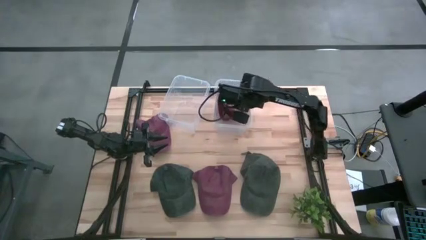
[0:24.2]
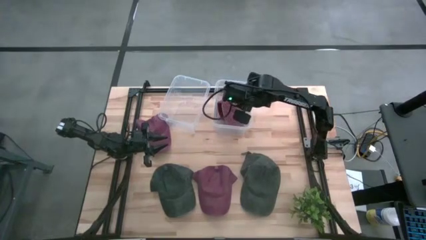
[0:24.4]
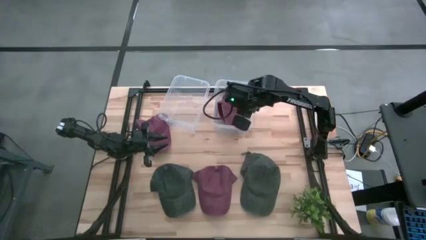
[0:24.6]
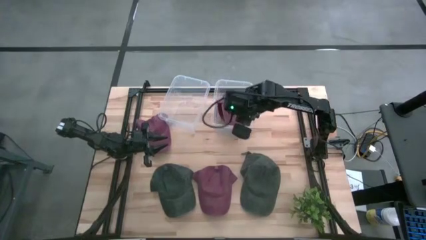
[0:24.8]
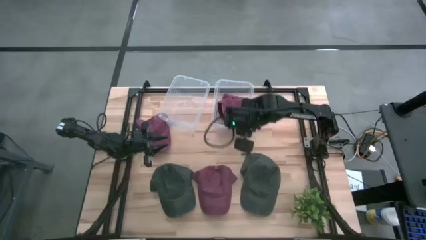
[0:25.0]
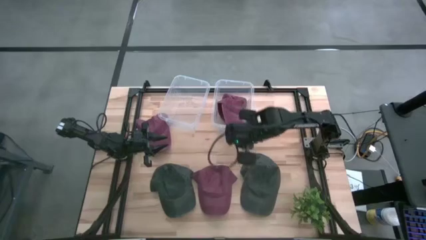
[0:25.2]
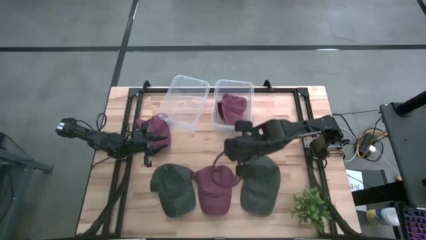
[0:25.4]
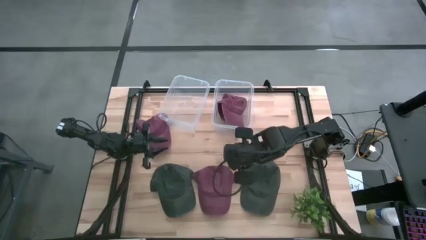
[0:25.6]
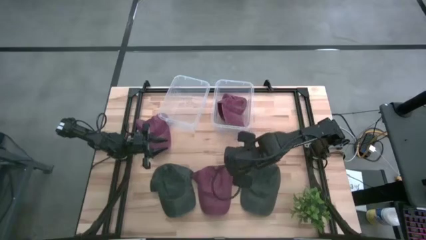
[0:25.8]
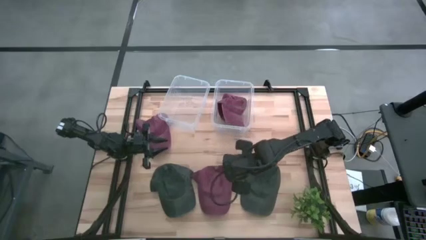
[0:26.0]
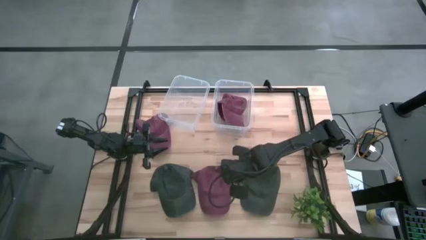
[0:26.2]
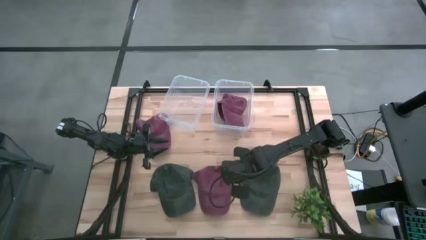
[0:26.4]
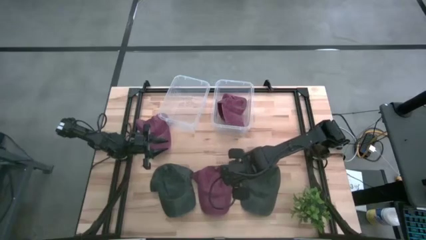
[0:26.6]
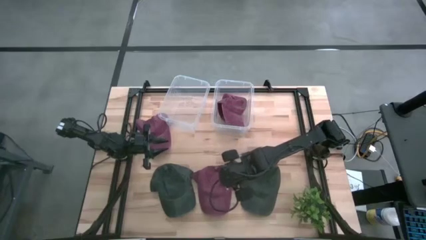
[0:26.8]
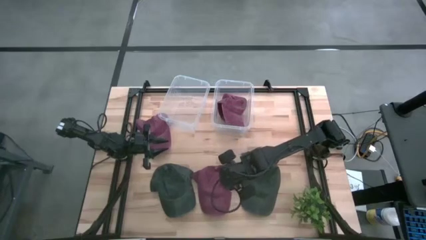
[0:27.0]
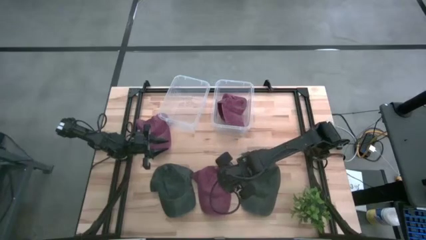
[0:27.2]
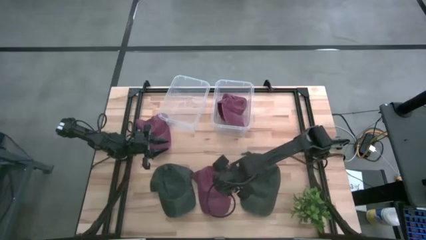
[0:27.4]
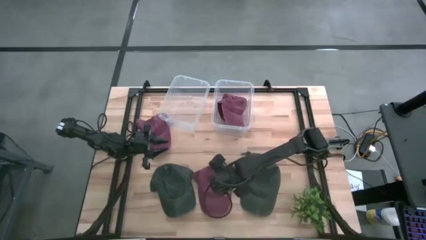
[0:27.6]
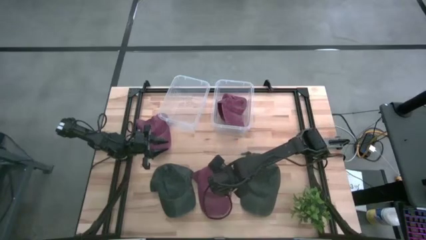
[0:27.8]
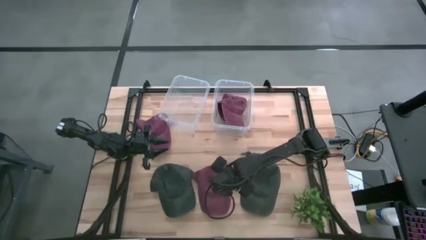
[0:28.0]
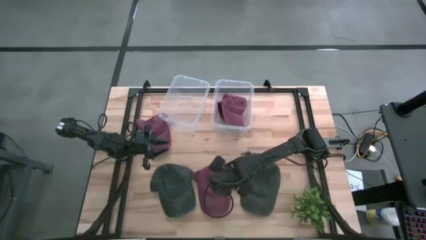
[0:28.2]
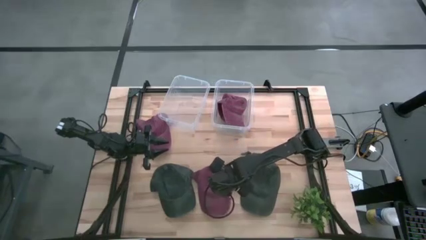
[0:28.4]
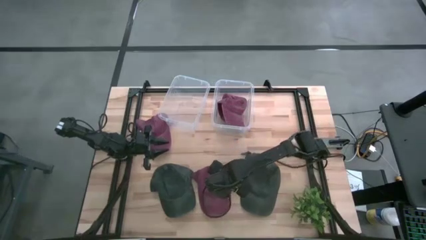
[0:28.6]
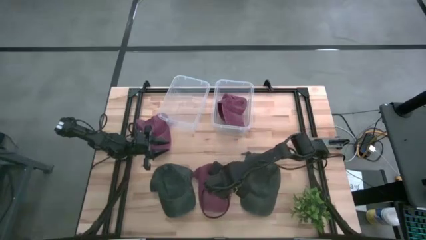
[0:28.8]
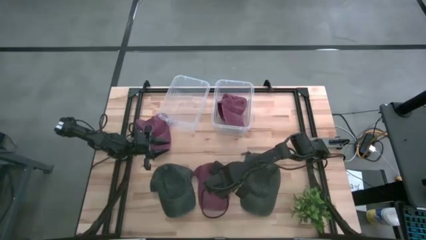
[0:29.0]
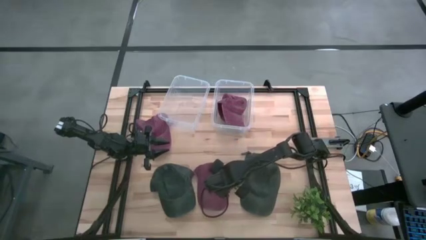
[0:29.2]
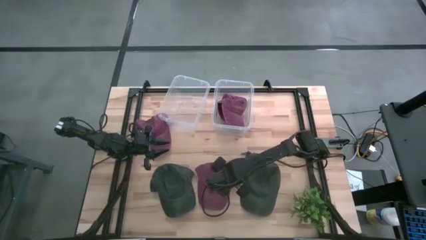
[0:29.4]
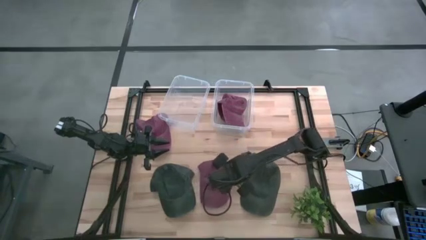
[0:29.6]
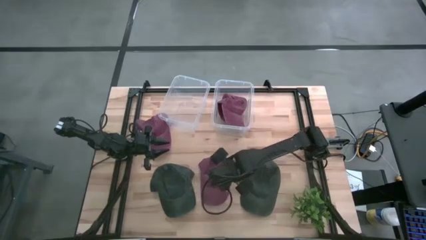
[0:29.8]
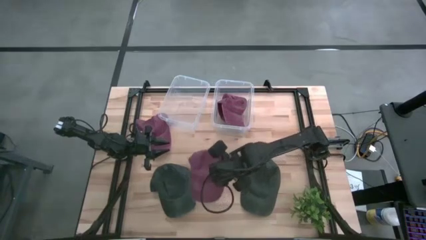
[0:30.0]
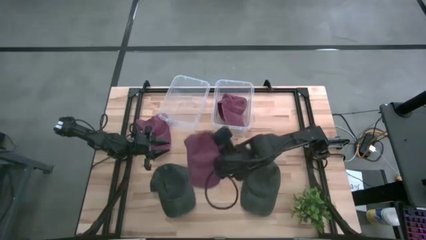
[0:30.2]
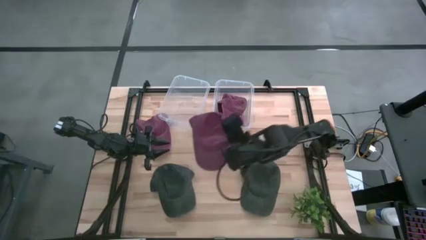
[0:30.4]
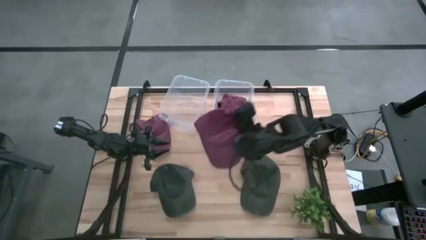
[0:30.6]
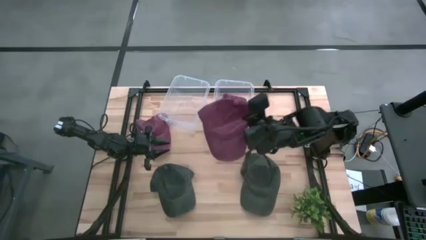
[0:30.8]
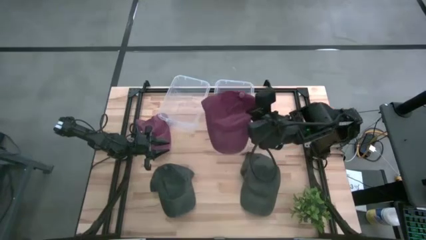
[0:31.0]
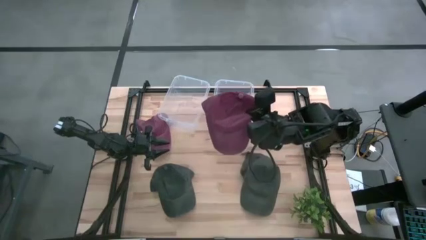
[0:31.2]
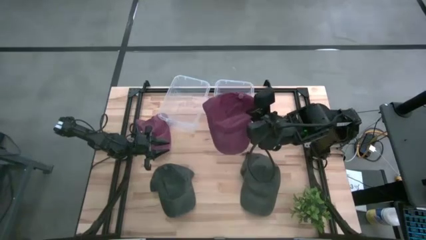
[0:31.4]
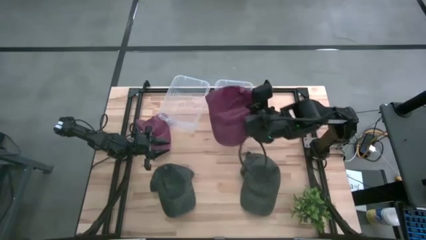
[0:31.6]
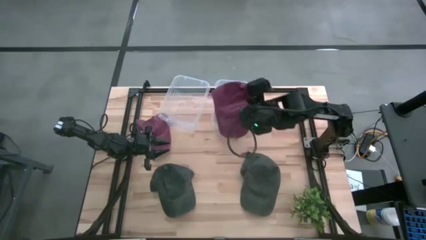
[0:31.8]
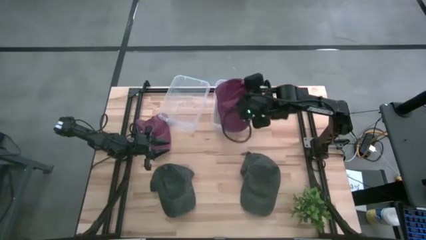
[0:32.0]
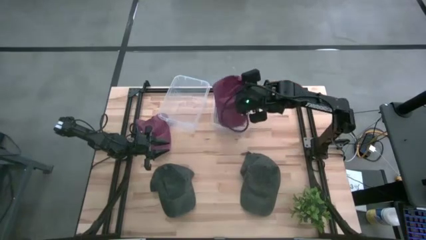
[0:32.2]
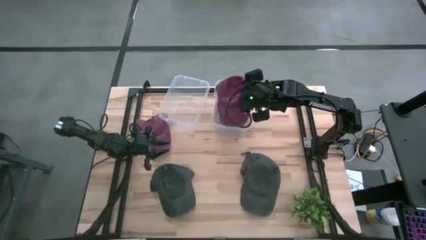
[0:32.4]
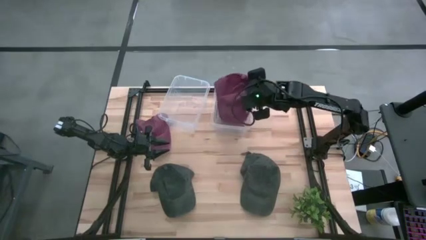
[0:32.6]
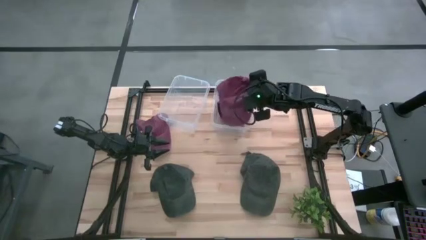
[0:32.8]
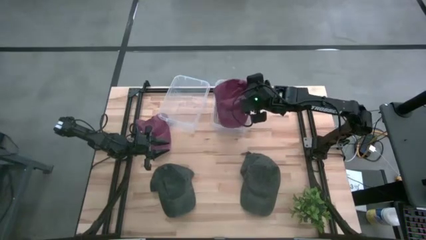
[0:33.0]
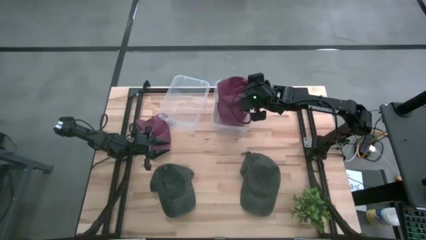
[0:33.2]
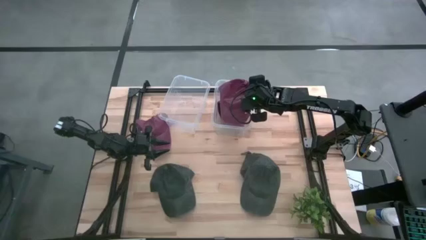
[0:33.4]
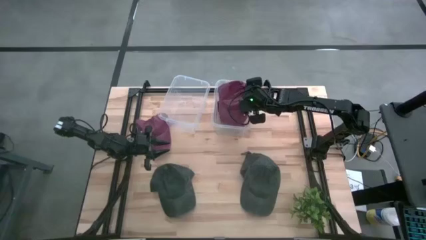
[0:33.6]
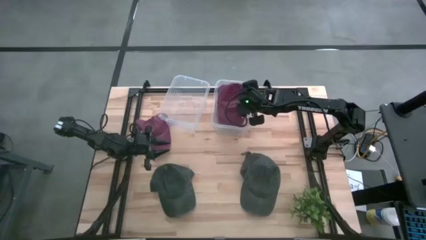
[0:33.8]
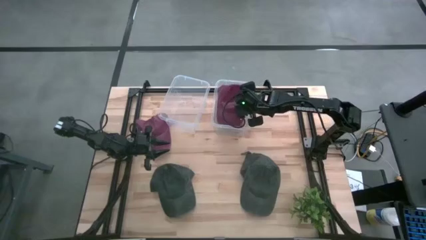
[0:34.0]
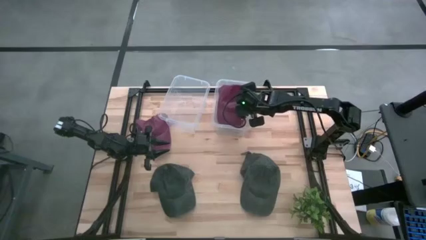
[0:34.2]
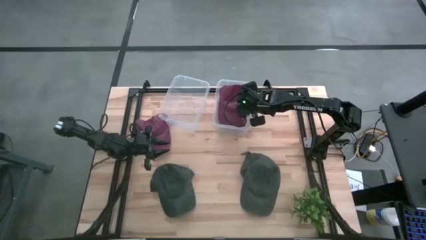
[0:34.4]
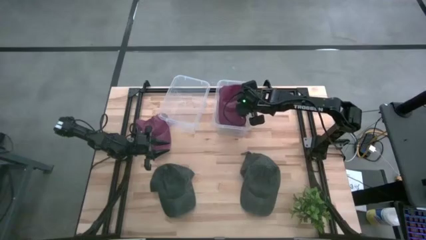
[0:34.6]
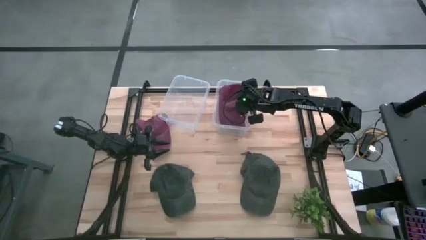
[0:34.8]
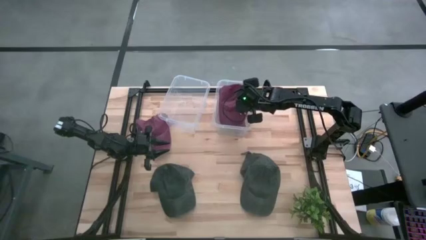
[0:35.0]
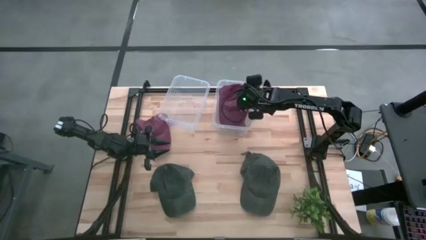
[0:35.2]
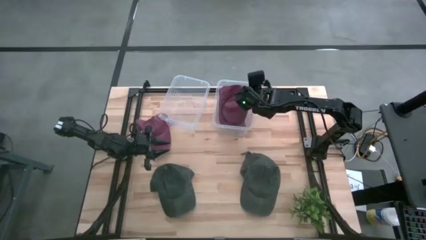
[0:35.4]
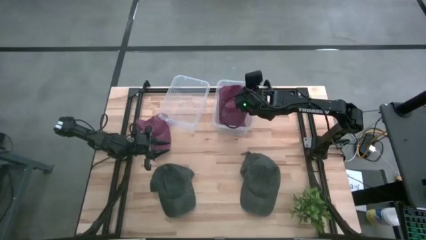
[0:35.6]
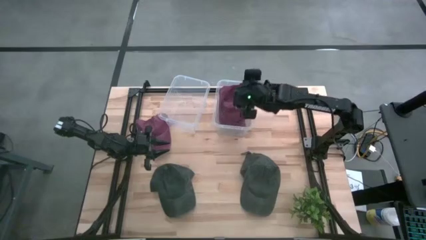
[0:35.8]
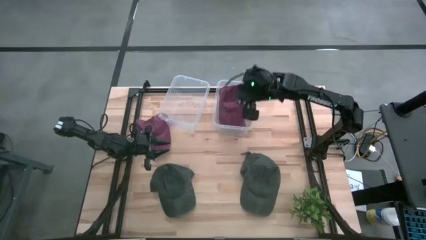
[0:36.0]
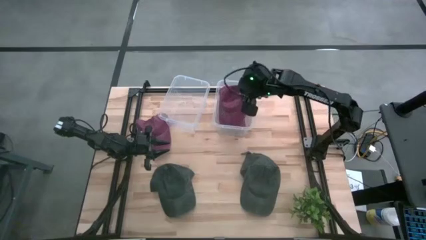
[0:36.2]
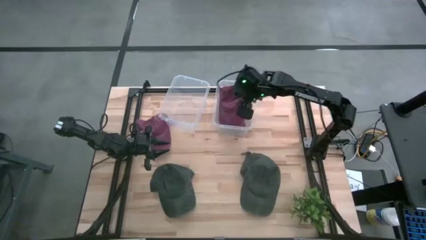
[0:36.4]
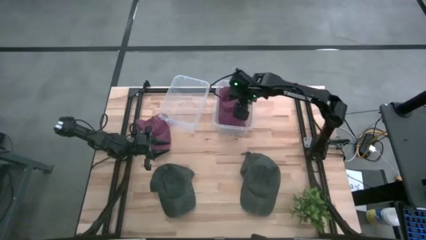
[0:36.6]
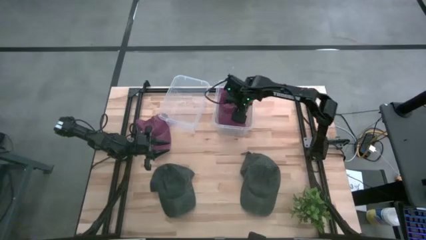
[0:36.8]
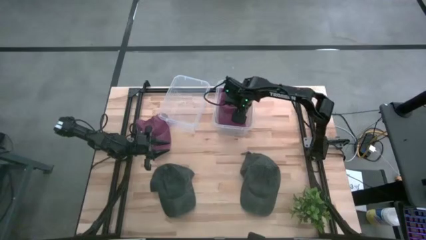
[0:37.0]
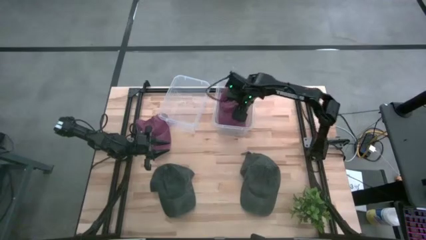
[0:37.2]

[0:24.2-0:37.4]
Task: Pick & Place hat
Put the bottom red cap into the right transparent bin

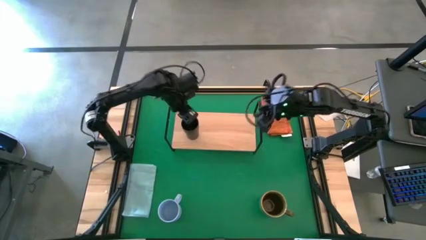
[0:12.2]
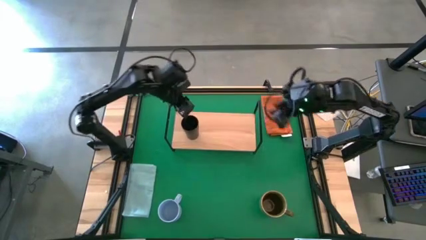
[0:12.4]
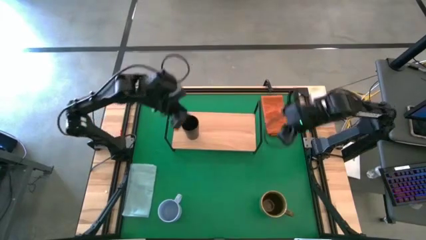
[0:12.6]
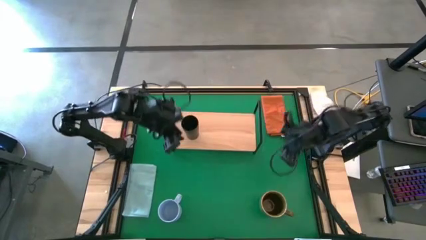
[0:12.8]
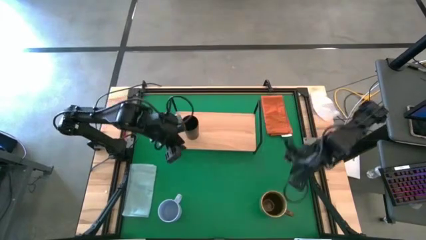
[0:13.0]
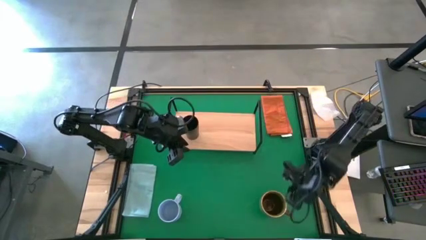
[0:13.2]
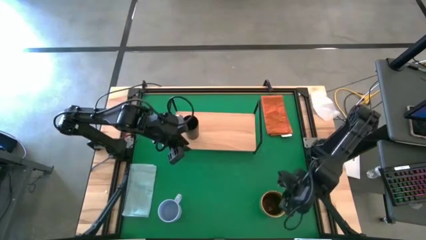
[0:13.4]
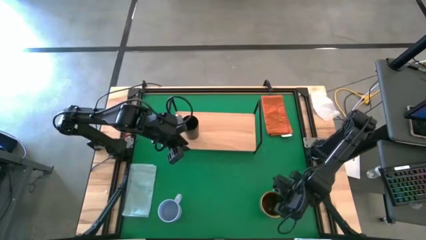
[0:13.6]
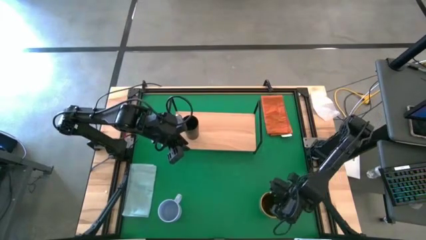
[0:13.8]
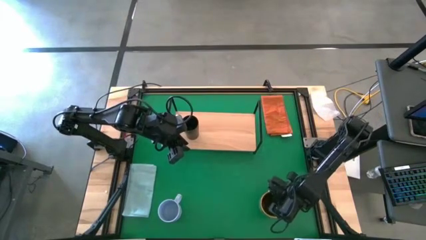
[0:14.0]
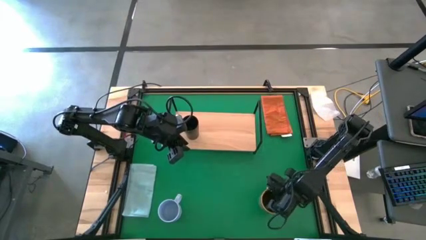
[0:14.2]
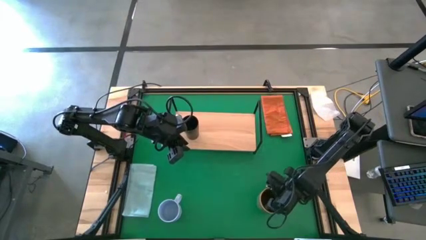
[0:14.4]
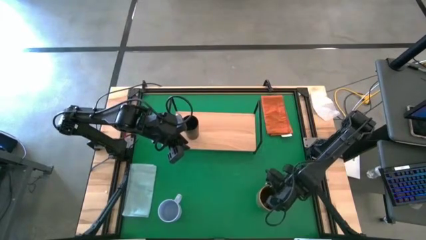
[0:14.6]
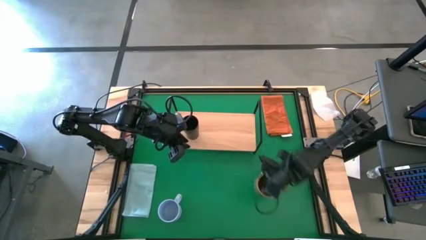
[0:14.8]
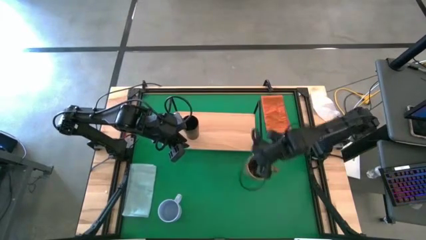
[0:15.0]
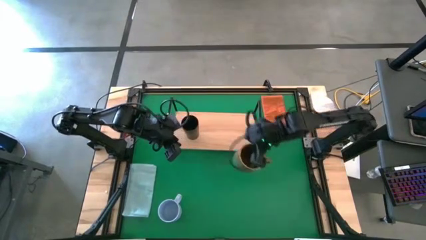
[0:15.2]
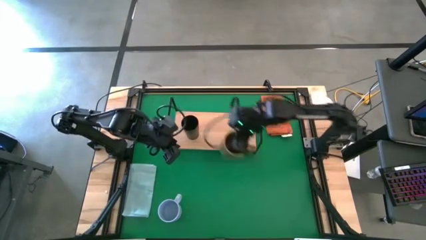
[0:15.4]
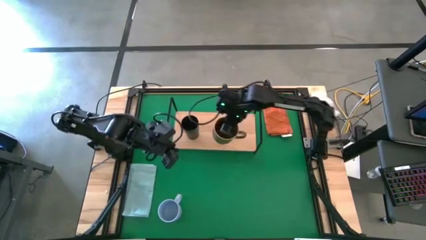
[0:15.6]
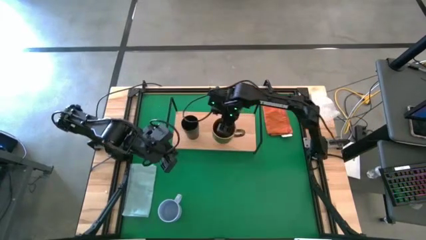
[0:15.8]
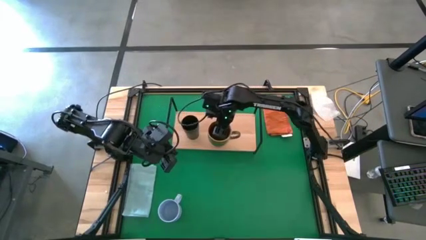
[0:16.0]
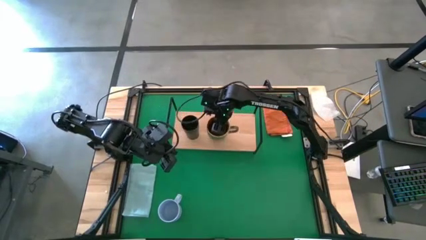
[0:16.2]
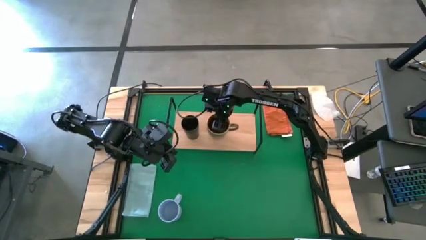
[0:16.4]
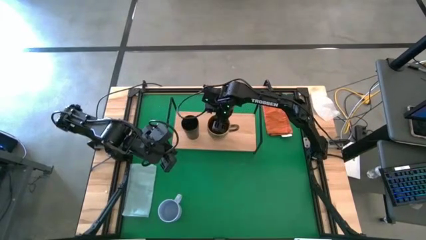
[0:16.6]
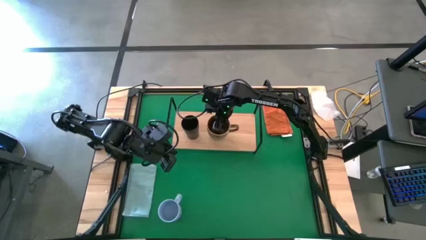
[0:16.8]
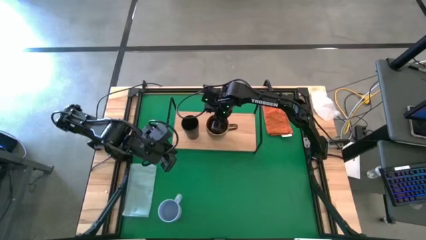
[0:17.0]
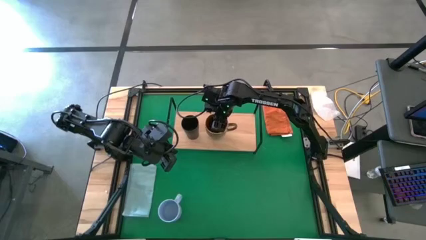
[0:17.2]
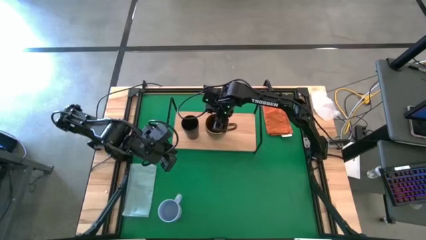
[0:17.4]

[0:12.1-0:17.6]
Task: Stack small to large cups/mugs on shelf
Put the brown mug on the shelf
